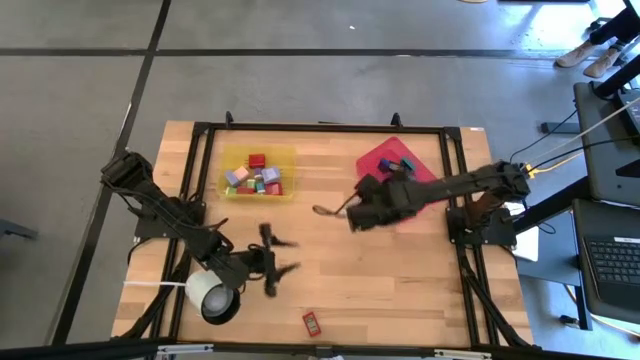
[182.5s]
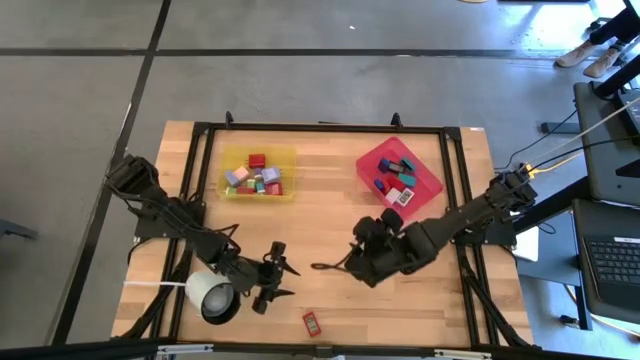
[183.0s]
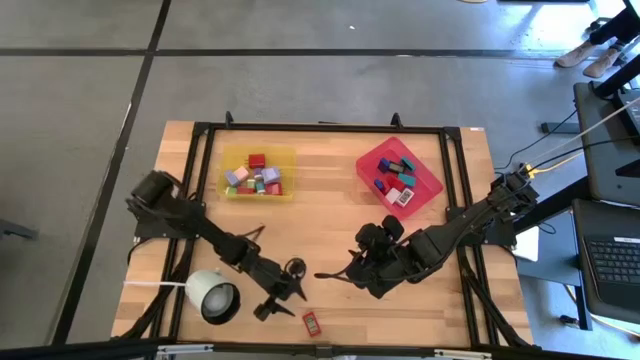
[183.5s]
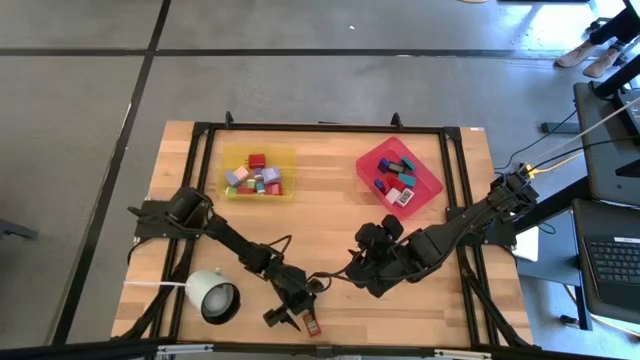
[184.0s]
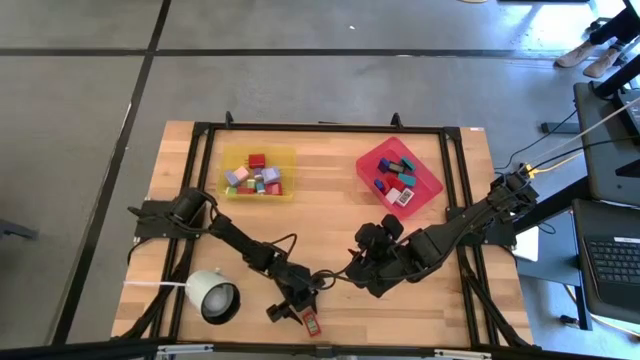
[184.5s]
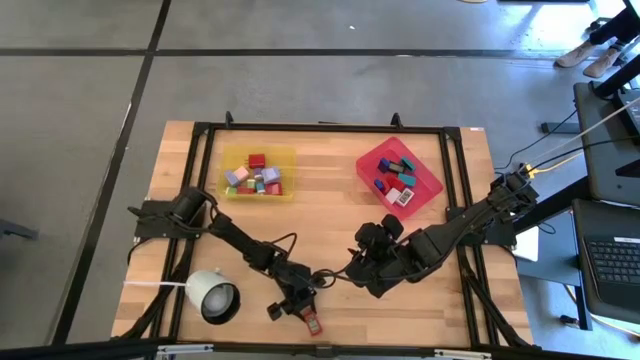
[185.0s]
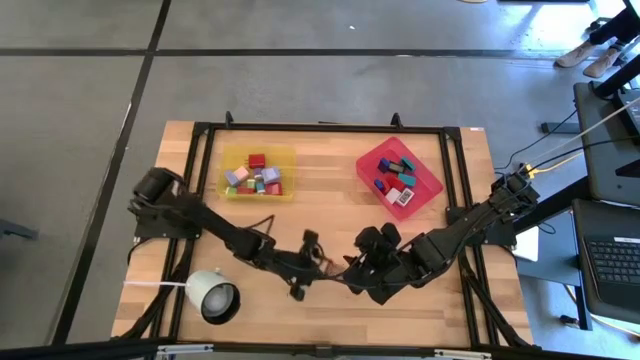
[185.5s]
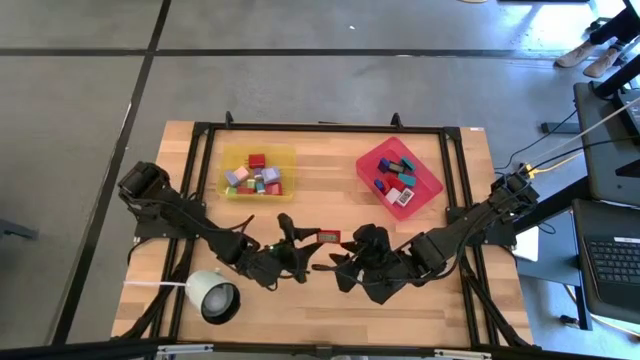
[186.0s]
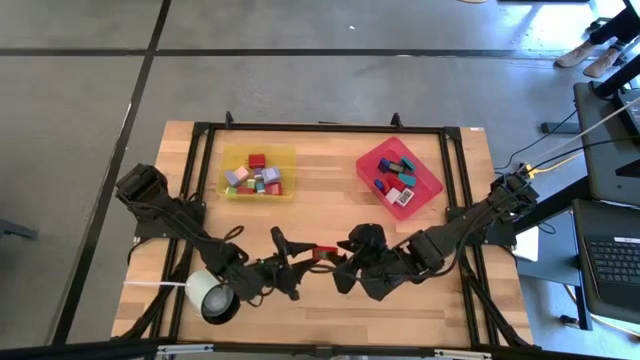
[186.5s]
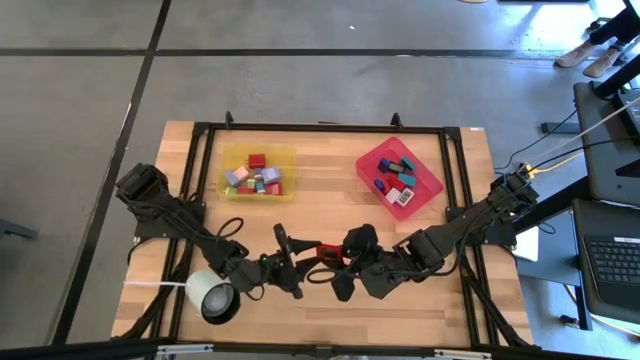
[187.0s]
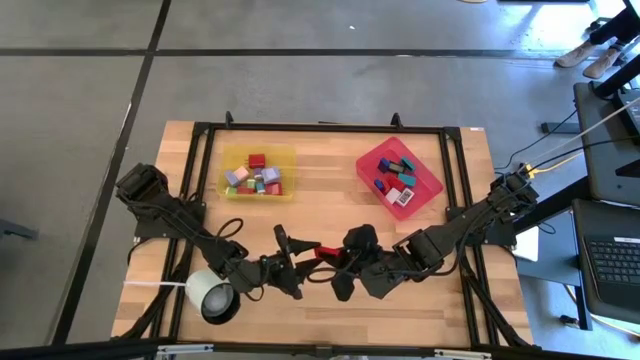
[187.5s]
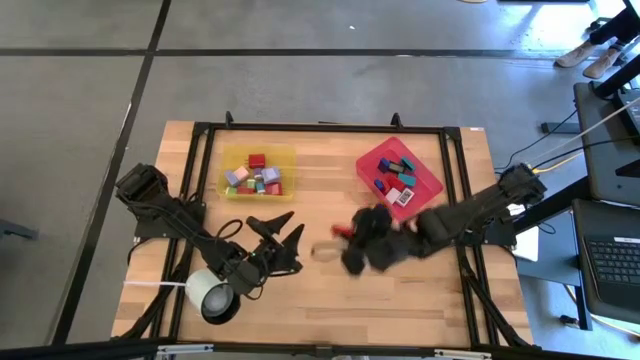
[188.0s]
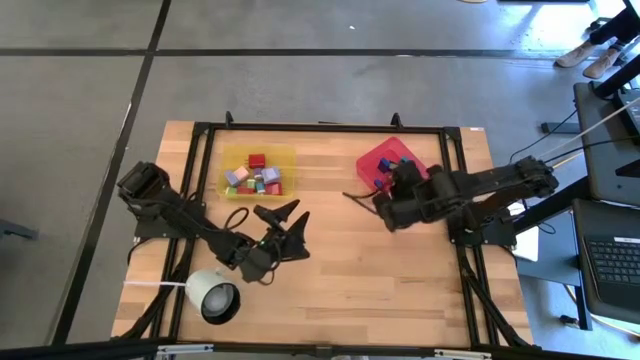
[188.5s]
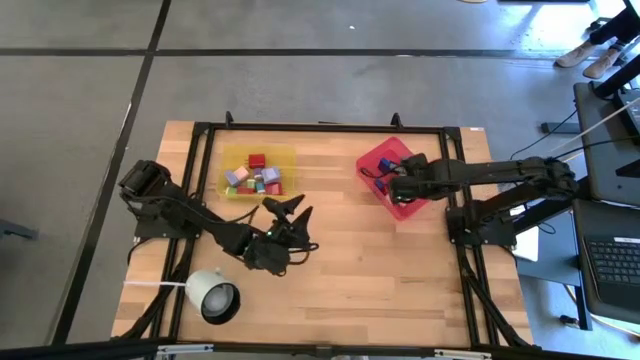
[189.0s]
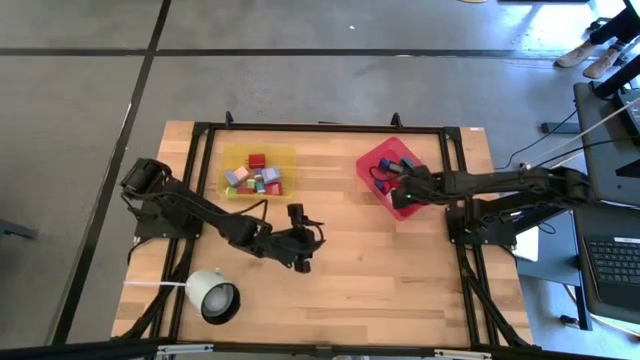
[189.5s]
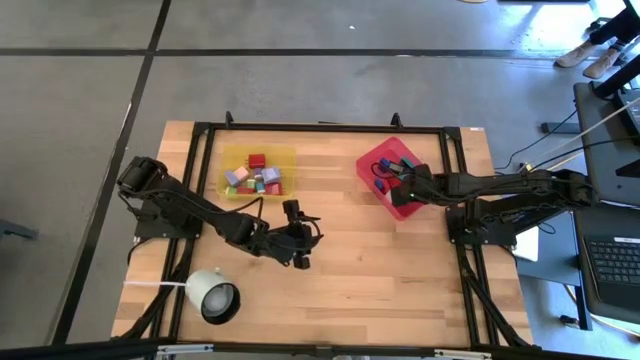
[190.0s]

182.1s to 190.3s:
Task: Pick & Place Office items
Put the red digital clock into the pink bin

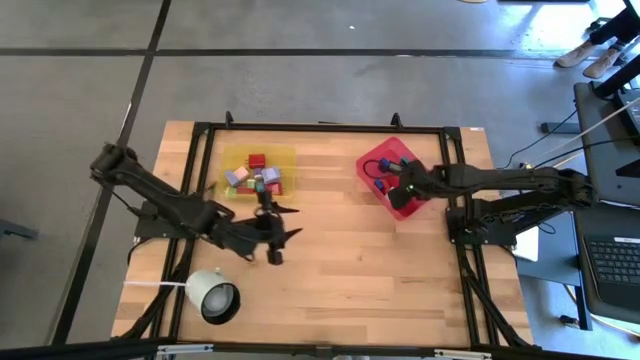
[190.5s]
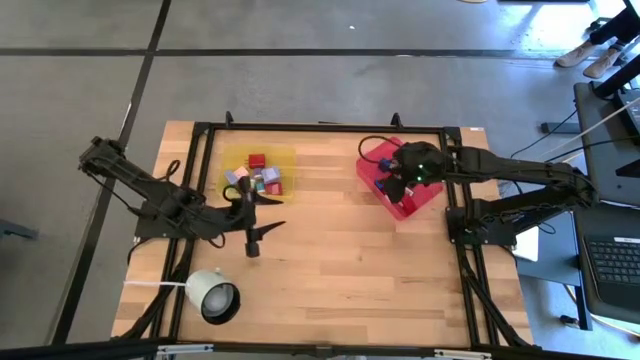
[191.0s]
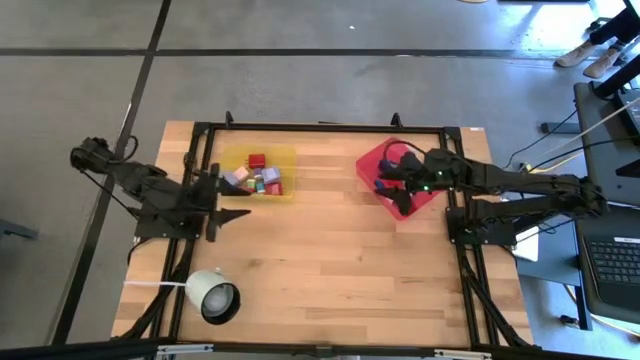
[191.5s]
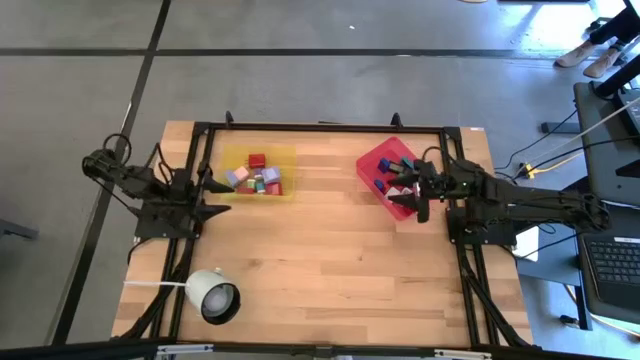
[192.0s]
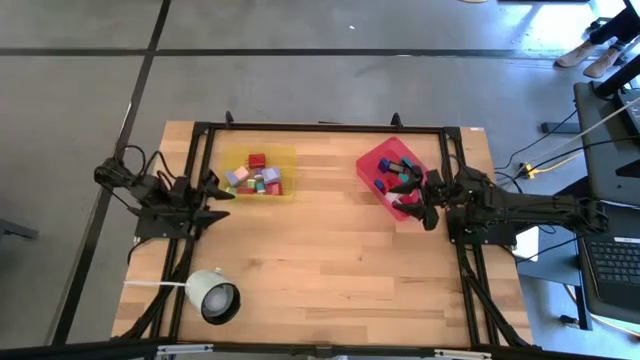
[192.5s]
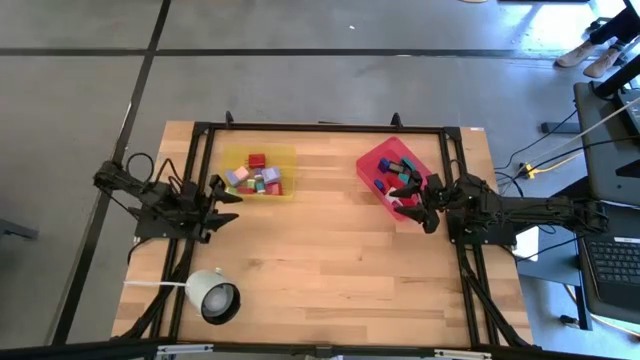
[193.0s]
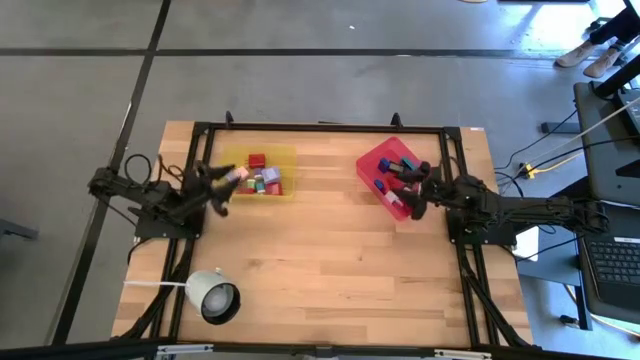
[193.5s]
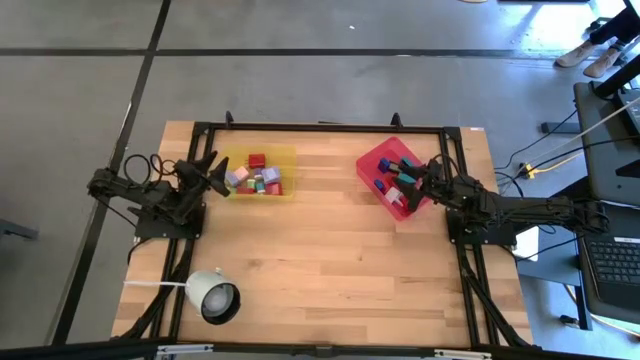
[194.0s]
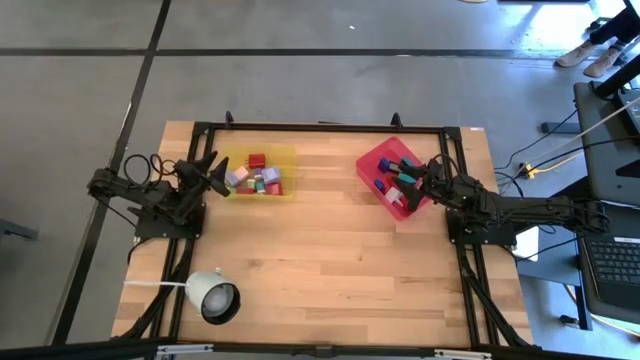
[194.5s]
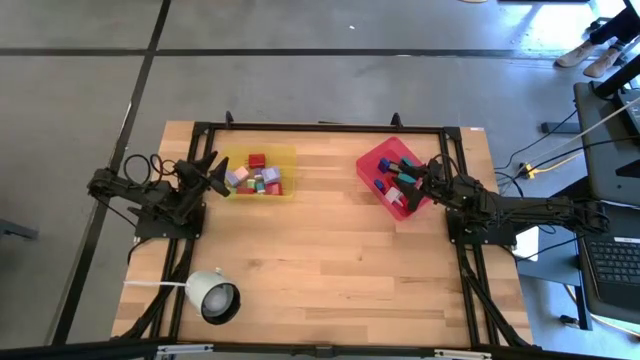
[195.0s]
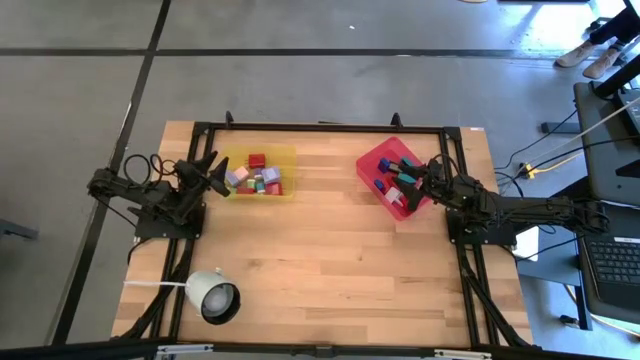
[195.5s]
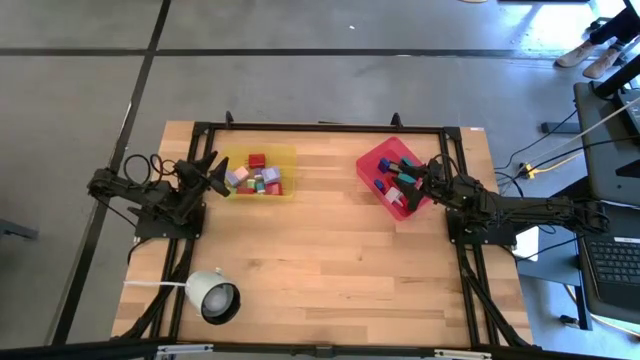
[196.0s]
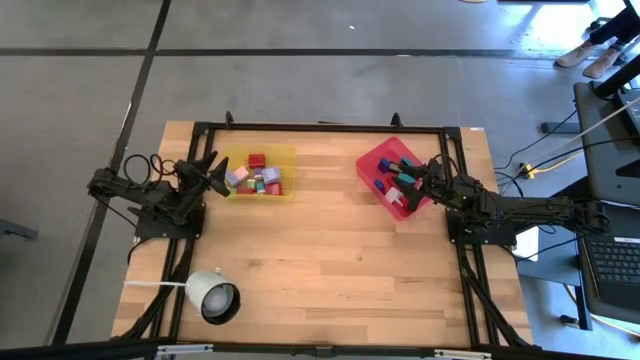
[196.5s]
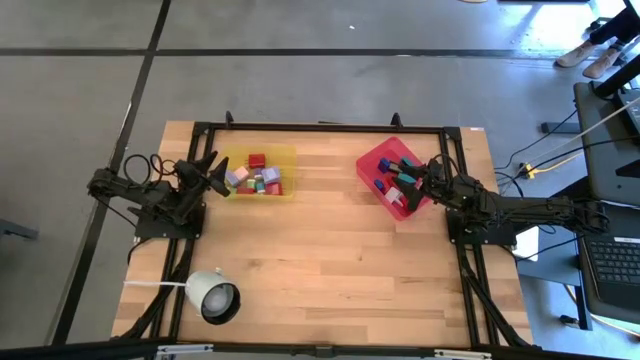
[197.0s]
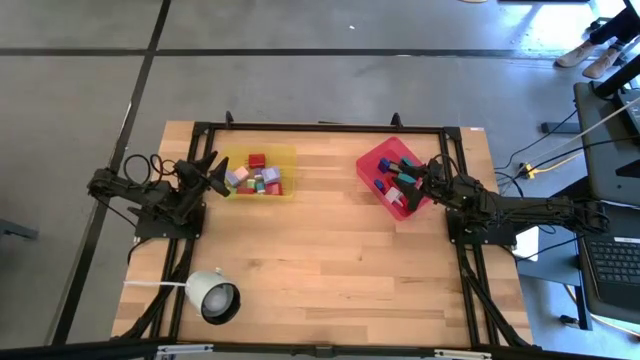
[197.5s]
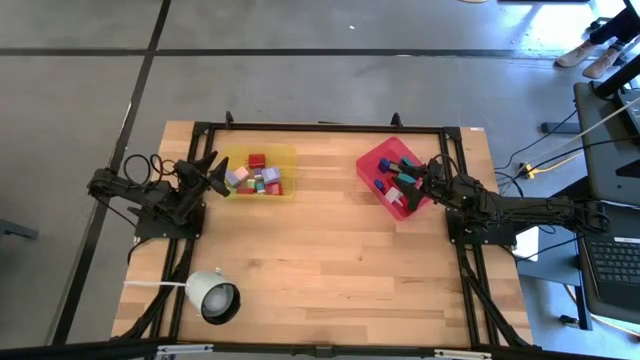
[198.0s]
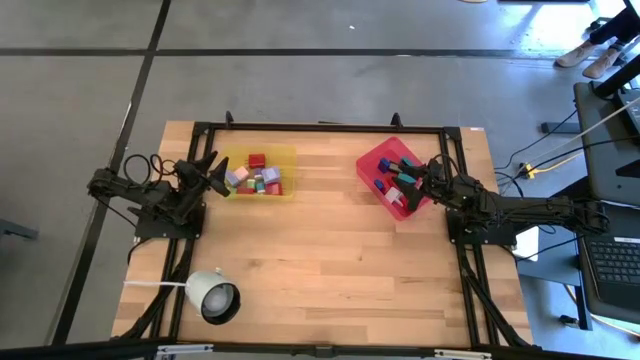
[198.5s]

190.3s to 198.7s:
Return to Home Position

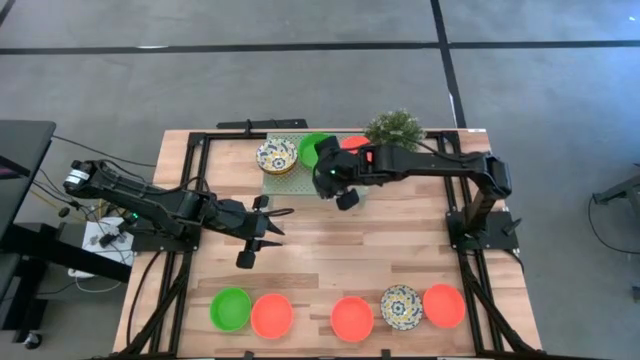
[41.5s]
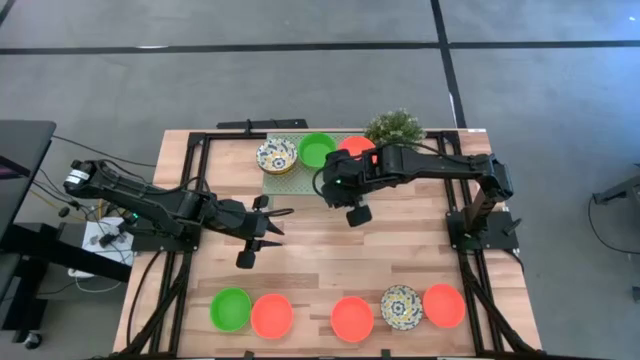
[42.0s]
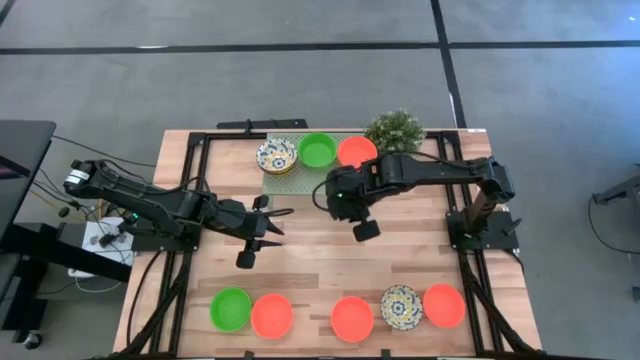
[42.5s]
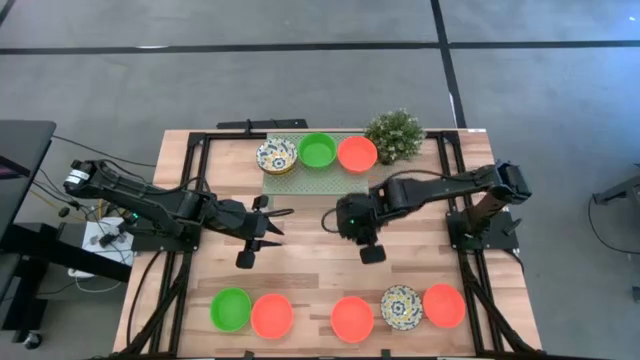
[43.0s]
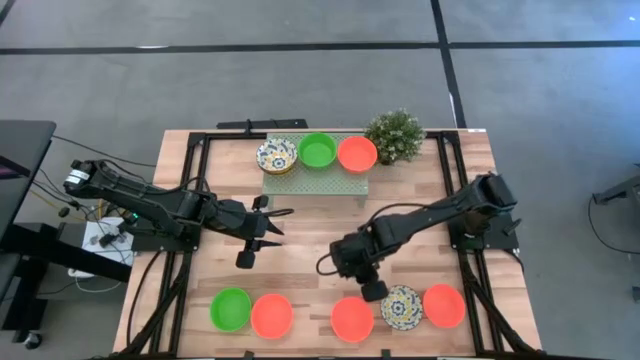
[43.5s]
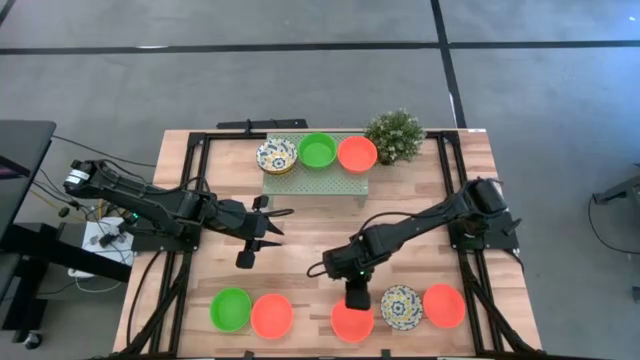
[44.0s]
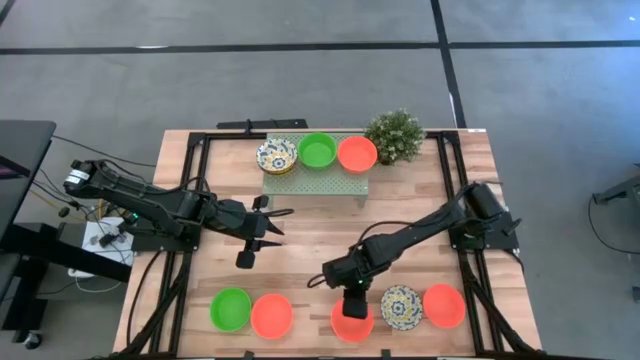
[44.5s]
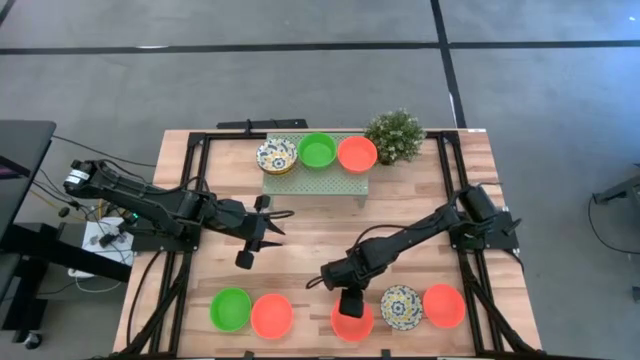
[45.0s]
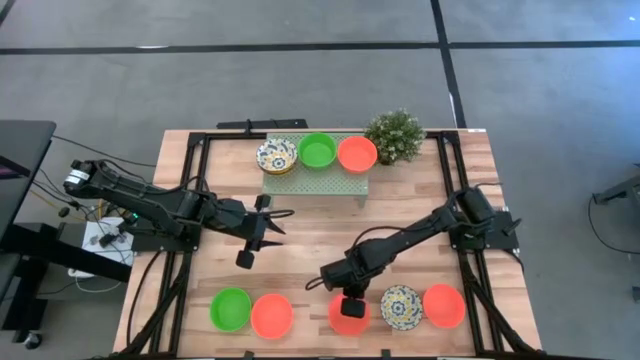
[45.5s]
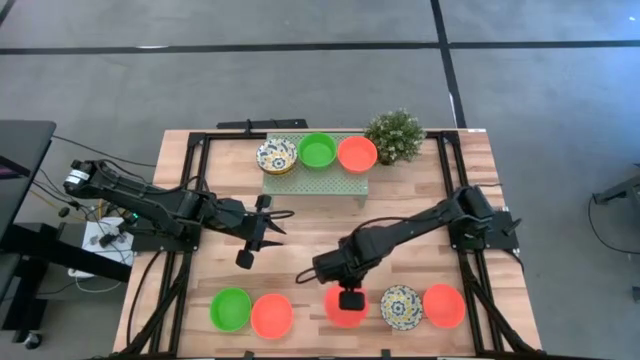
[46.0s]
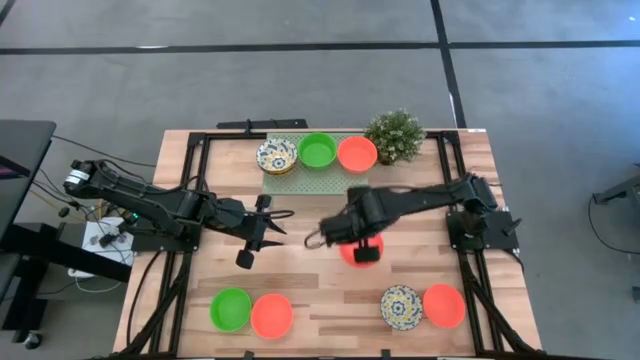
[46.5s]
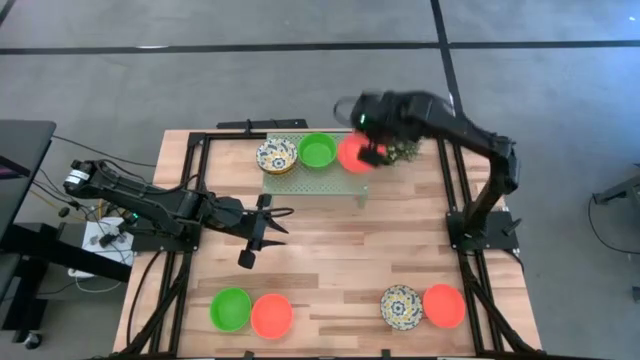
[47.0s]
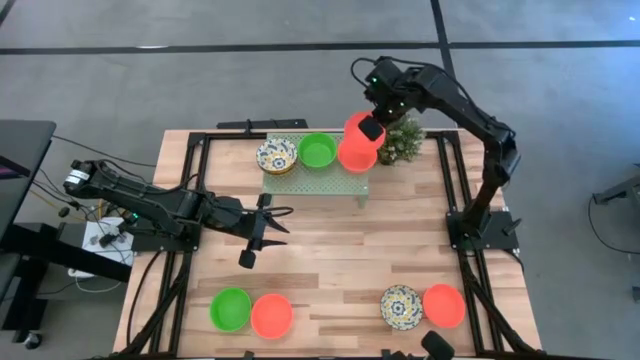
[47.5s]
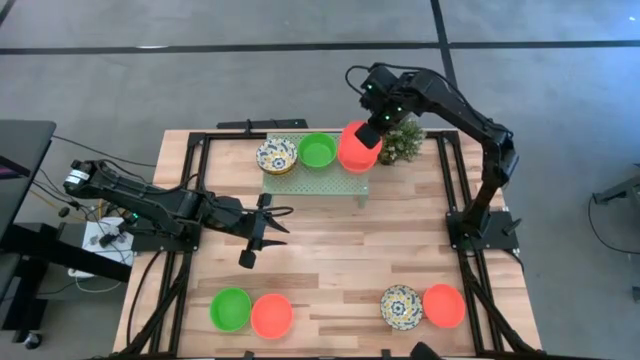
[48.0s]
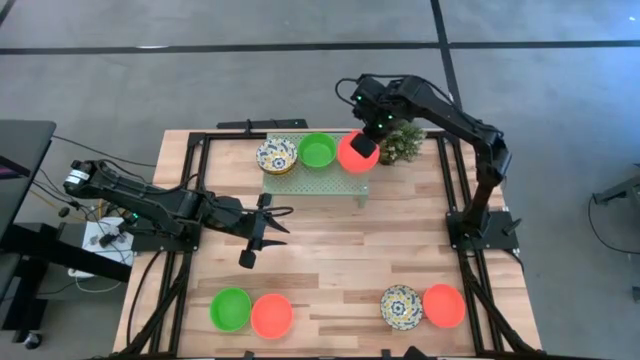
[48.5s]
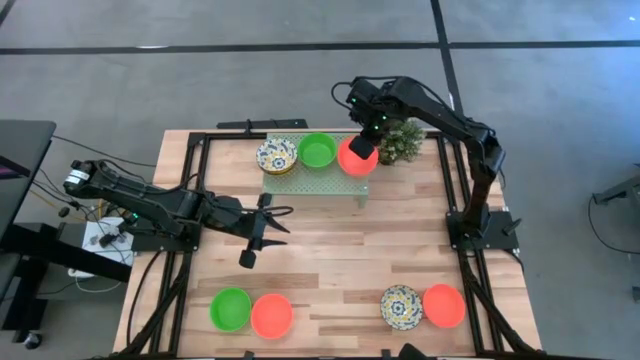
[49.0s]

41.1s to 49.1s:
Task: Pick & Place Mini bowls
Stack the orange bowl on the orange bowl on the shelf
